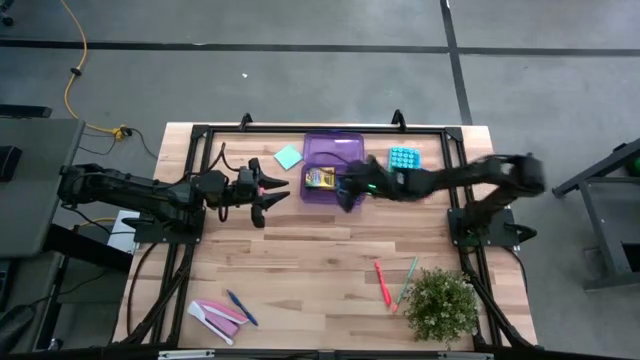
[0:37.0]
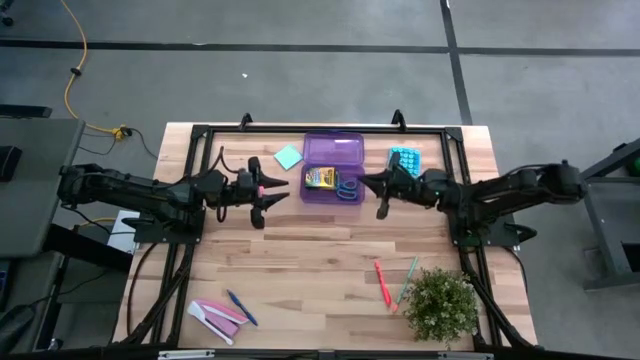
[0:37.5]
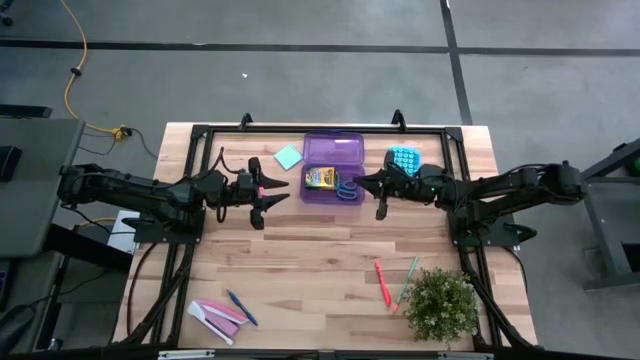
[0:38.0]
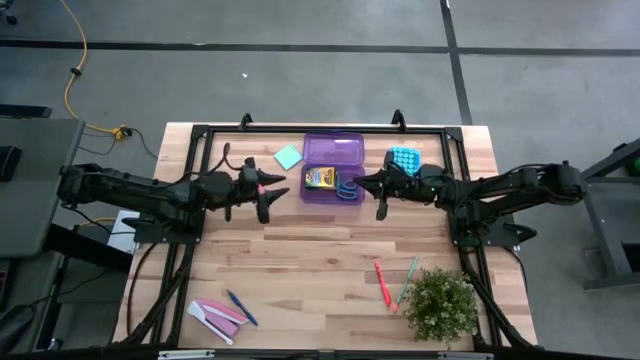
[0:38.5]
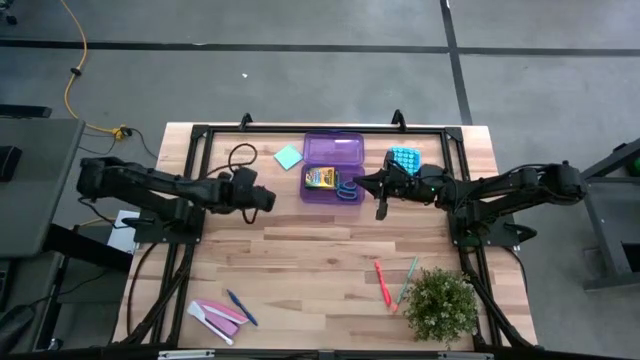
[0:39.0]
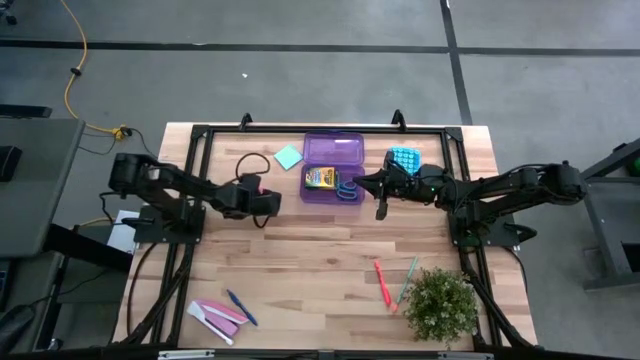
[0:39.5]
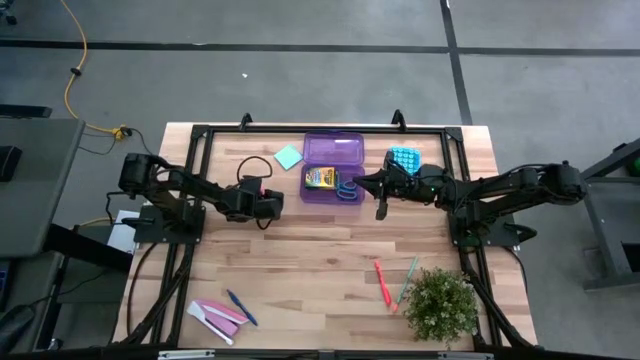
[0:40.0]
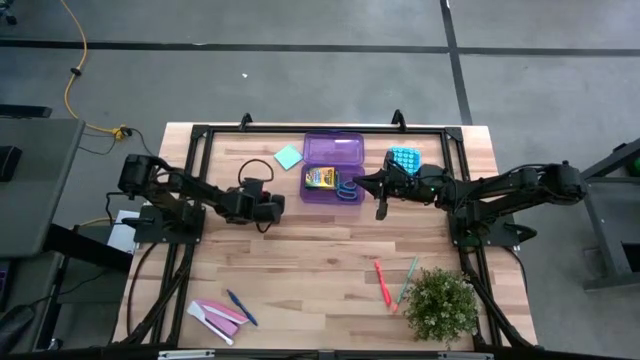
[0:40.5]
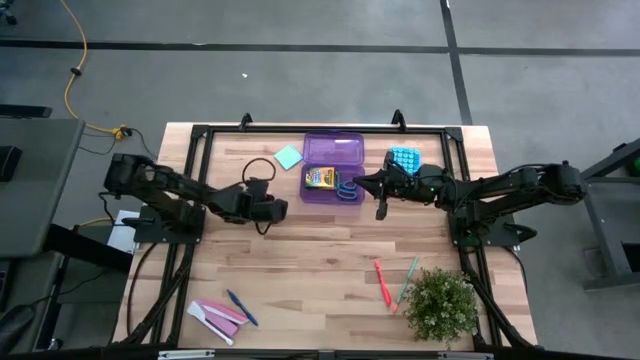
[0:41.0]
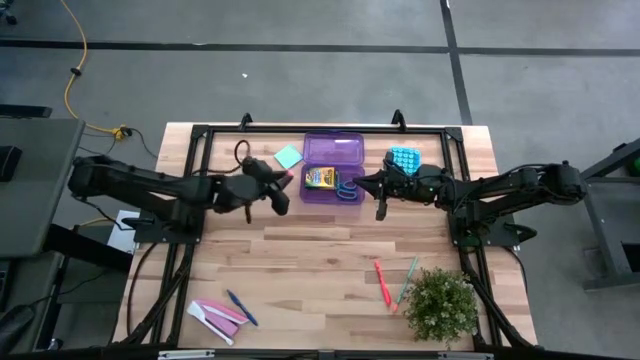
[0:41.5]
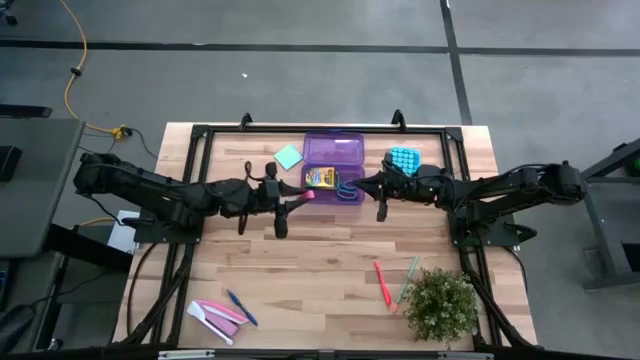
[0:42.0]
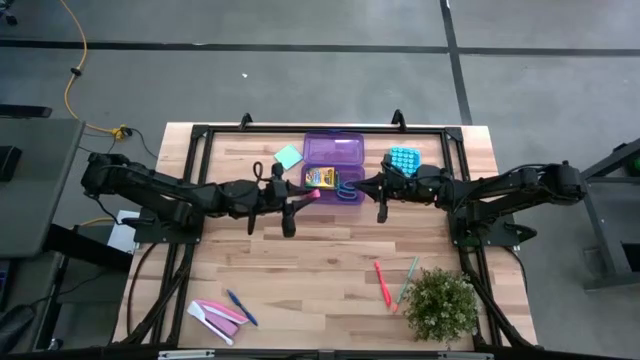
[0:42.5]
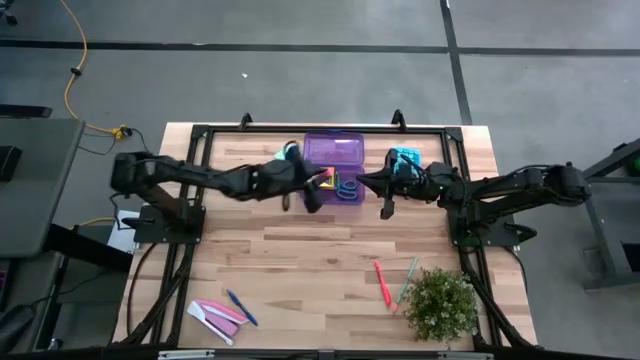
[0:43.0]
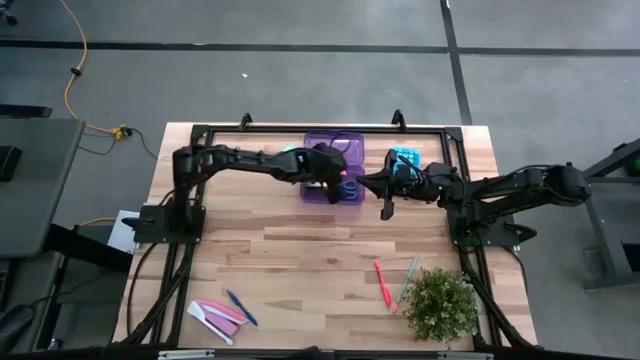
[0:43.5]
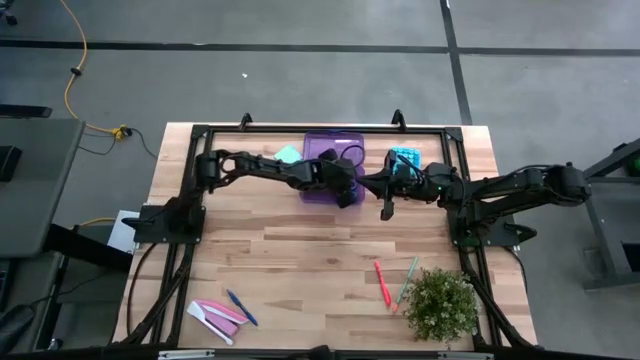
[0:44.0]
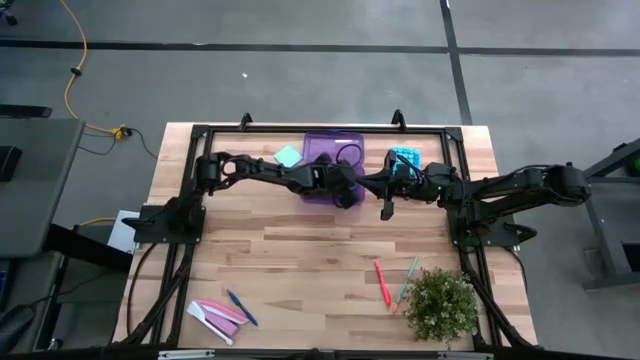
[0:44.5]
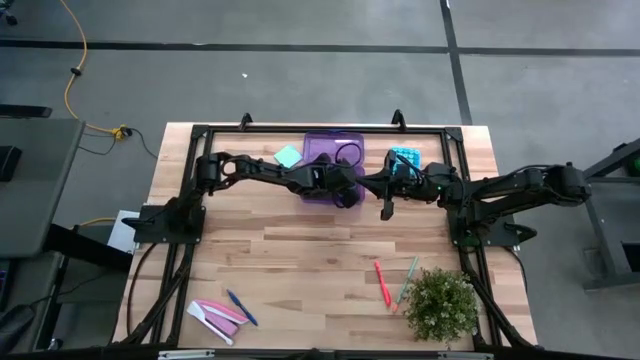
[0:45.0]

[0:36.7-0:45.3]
Task: Pack school essentials
Put the pink eraser into the violet supply box

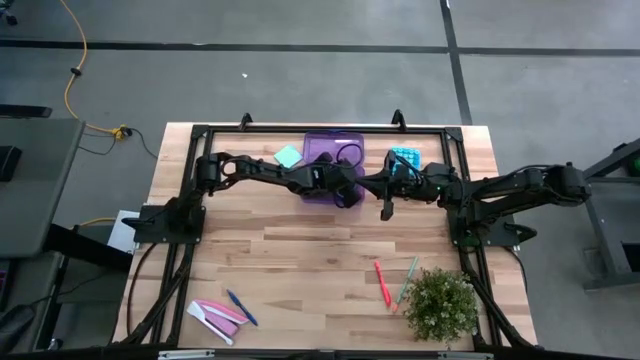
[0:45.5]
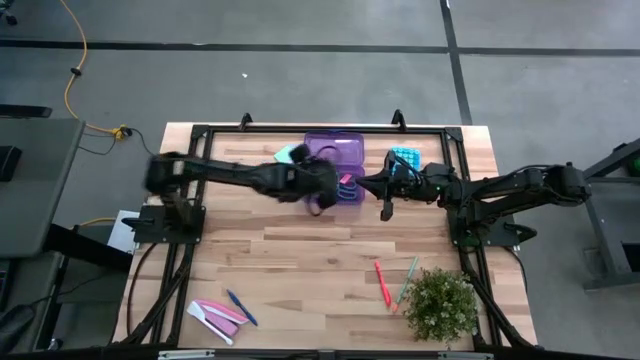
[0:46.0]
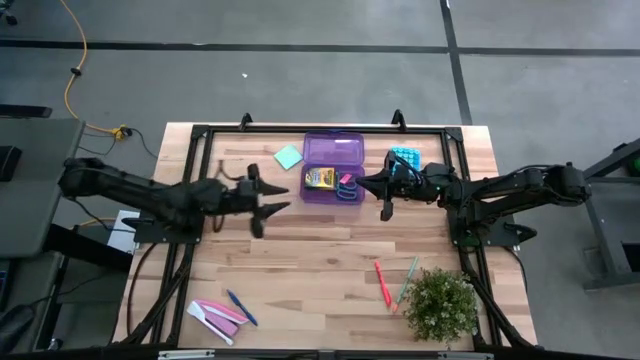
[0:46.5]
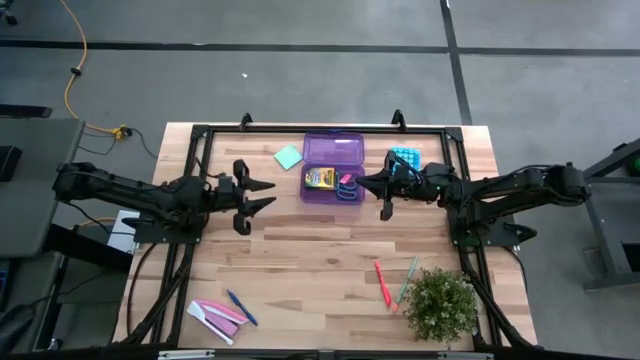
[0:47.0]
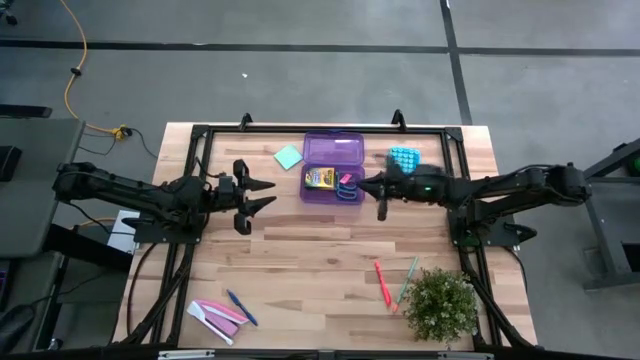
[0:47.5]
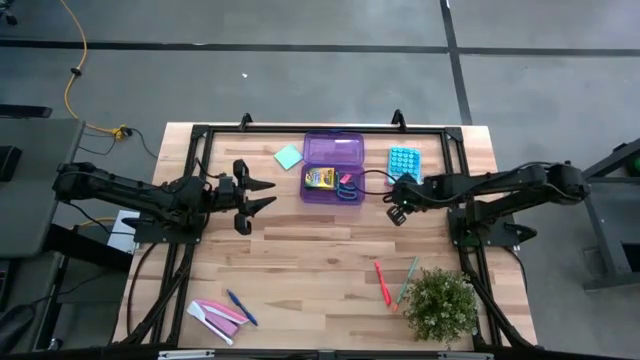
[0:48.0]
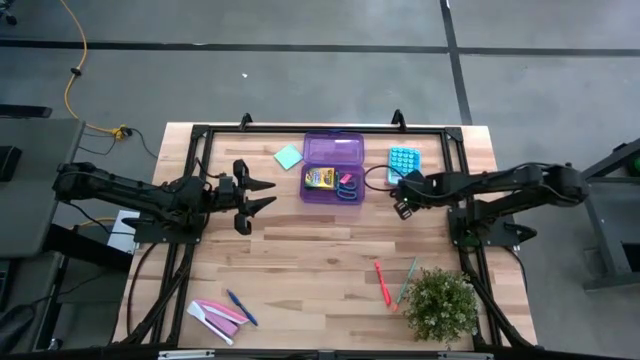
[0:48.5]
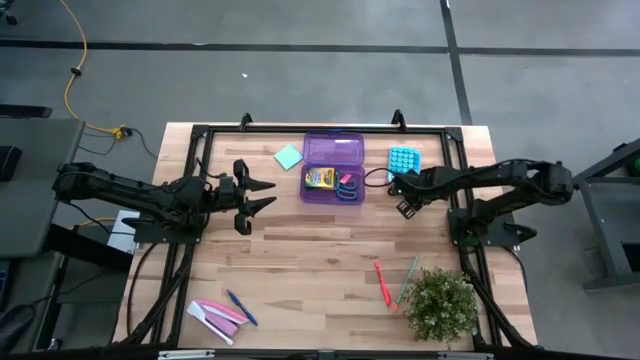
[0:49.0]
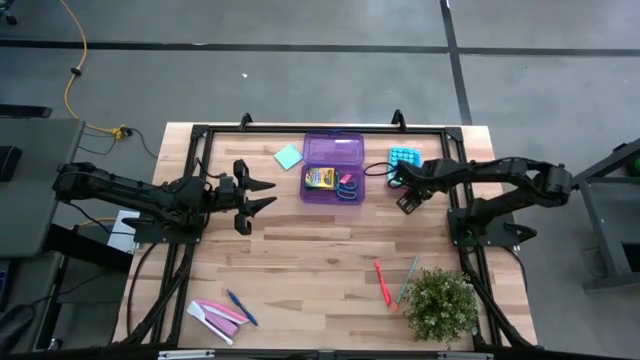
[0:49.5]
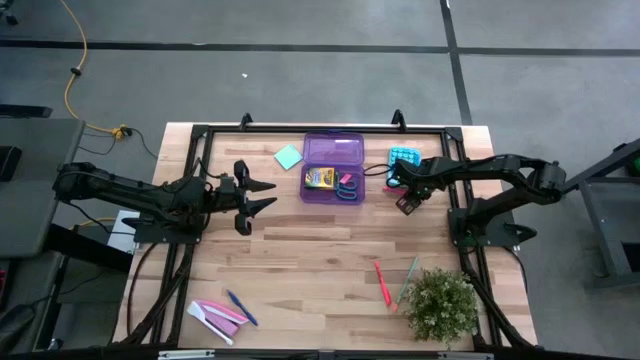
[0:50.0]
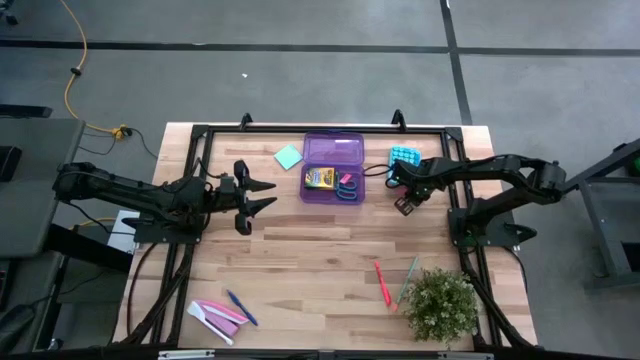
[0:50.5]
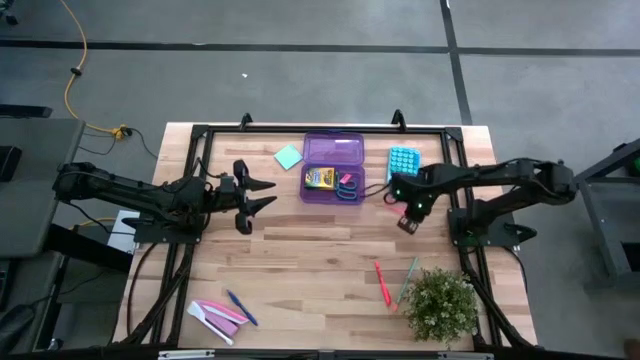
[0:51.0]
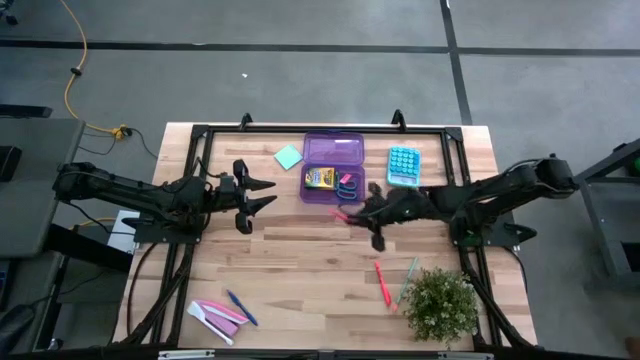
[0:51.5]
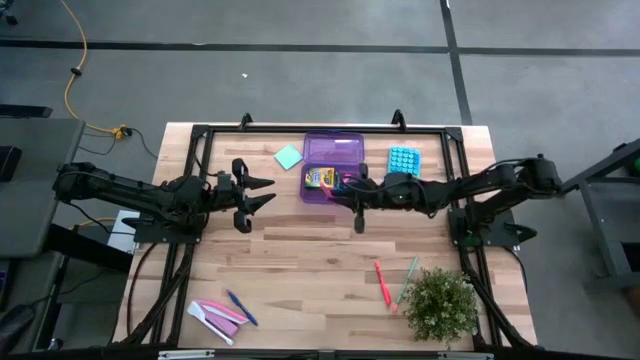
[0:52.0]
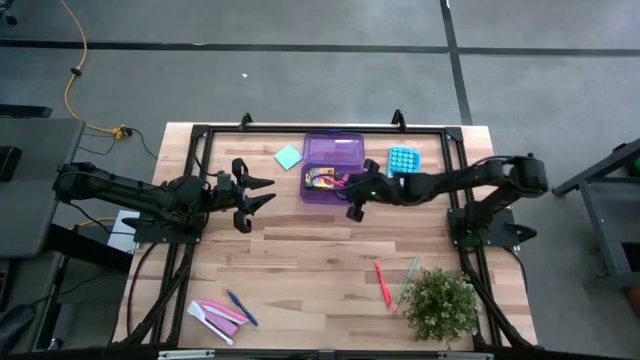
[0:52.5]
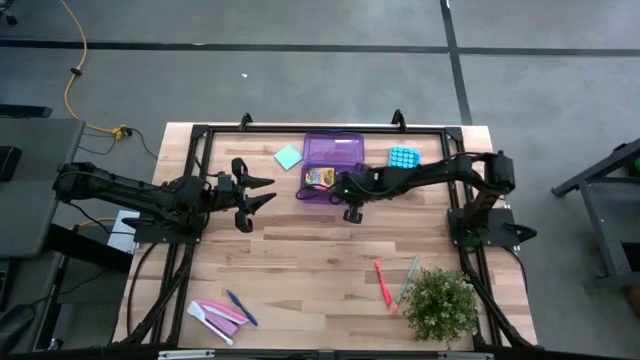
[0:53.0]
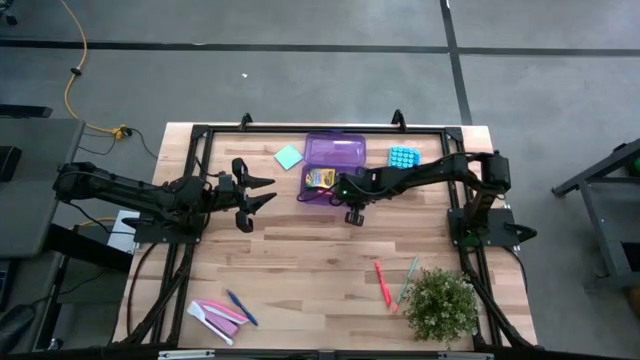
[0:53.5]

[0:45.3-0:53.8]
Put the pink pen into the violet supply box
